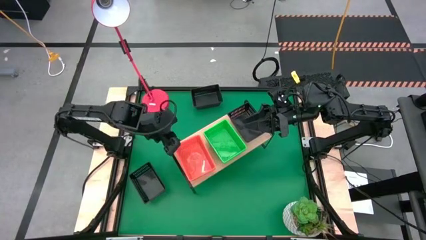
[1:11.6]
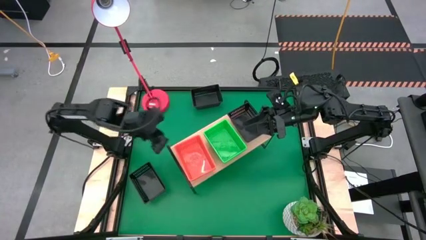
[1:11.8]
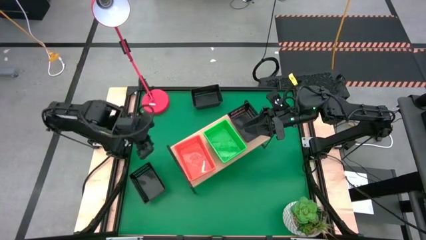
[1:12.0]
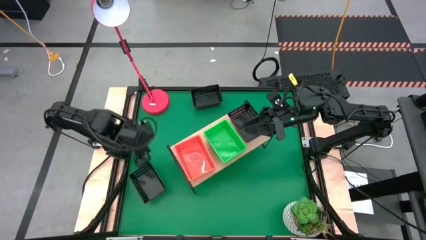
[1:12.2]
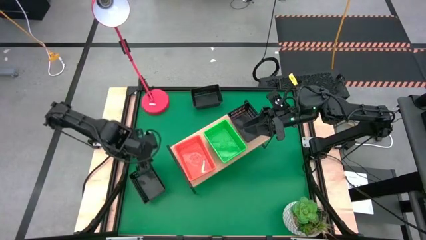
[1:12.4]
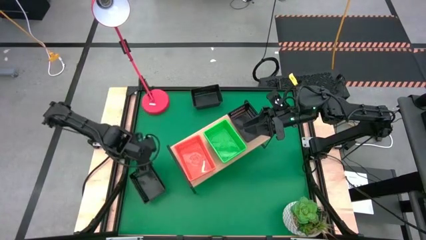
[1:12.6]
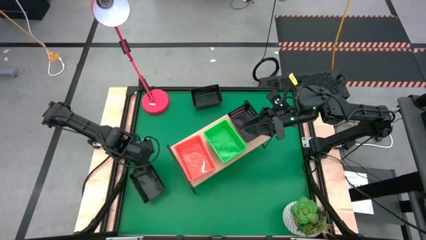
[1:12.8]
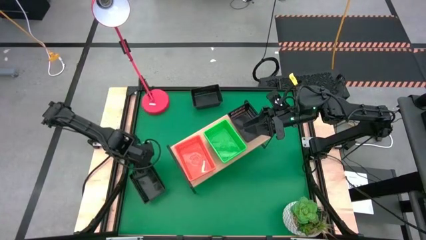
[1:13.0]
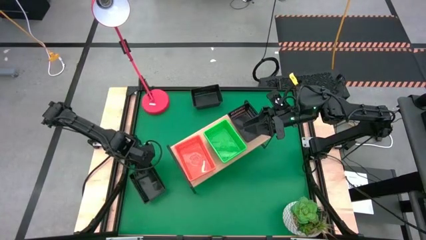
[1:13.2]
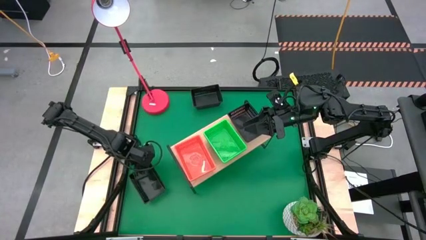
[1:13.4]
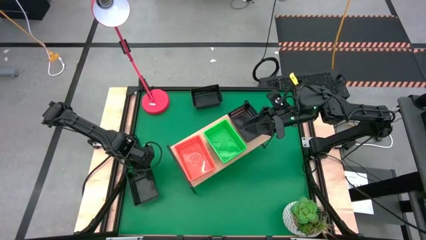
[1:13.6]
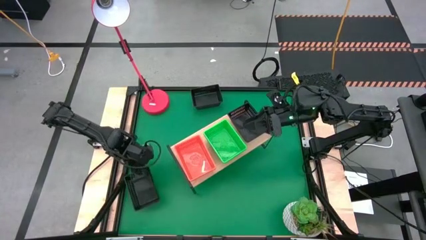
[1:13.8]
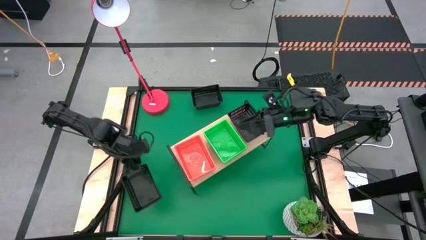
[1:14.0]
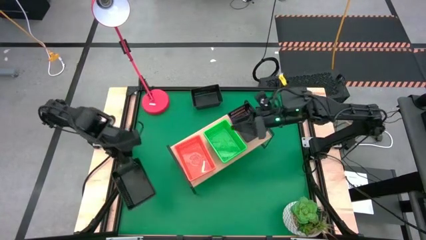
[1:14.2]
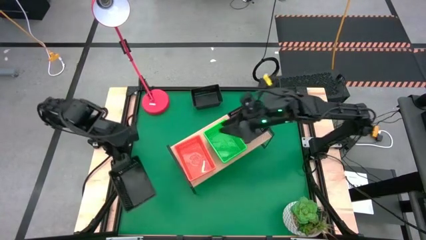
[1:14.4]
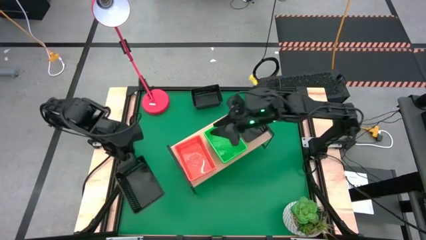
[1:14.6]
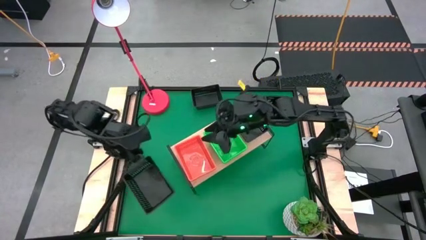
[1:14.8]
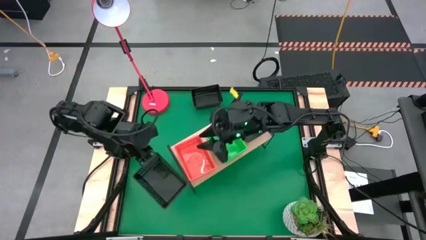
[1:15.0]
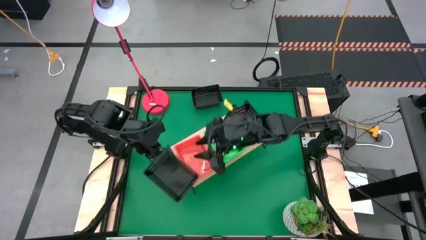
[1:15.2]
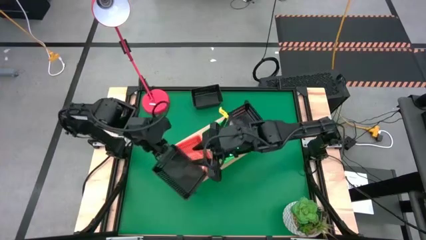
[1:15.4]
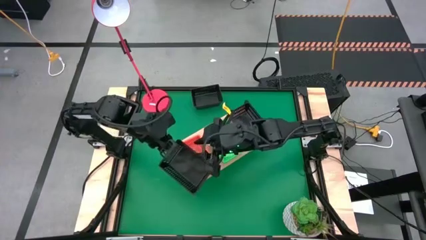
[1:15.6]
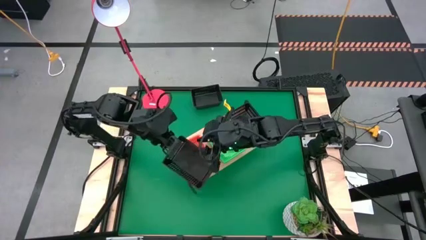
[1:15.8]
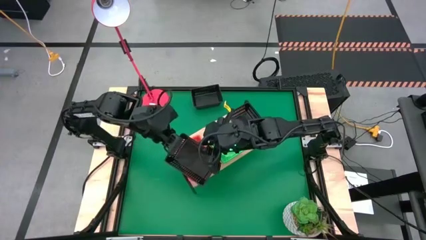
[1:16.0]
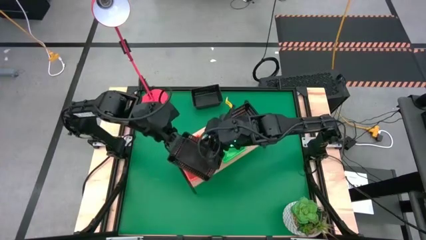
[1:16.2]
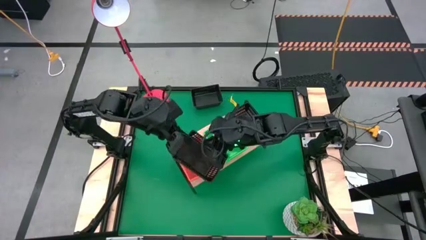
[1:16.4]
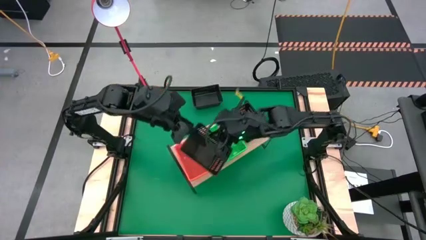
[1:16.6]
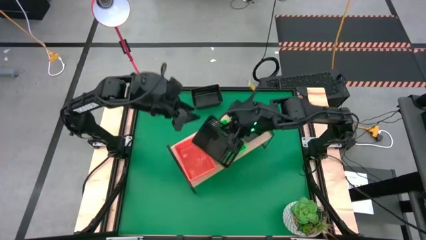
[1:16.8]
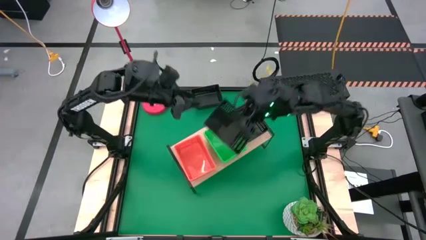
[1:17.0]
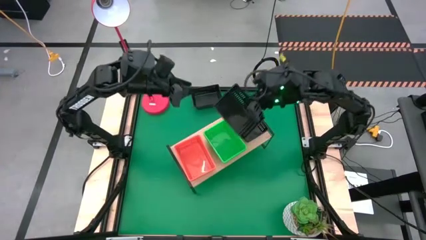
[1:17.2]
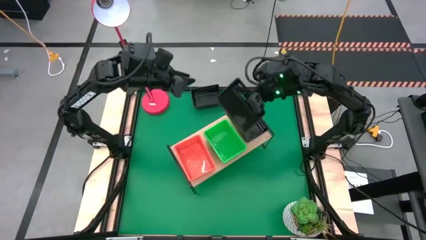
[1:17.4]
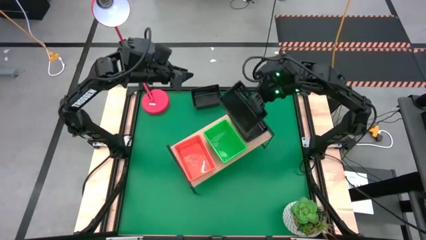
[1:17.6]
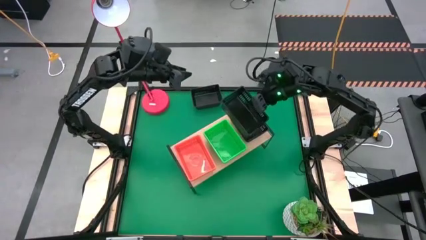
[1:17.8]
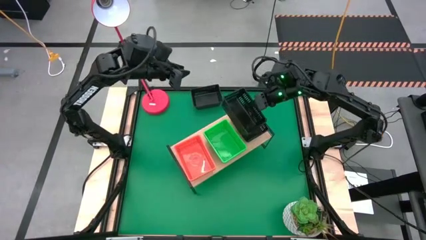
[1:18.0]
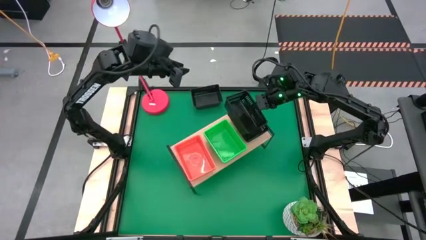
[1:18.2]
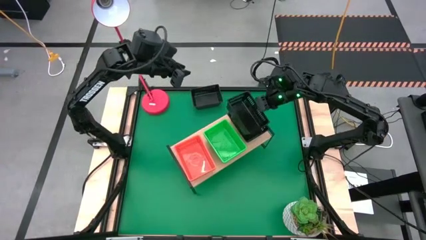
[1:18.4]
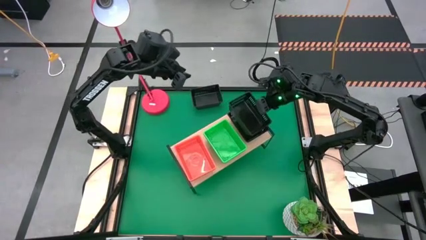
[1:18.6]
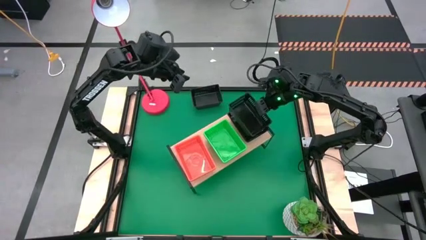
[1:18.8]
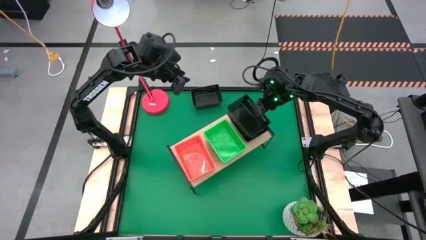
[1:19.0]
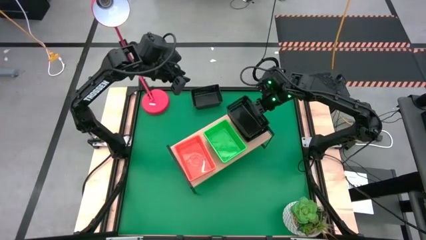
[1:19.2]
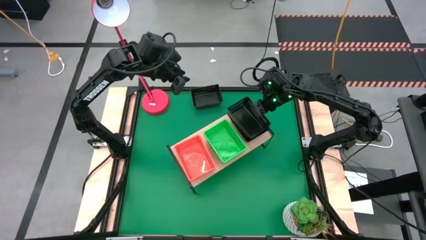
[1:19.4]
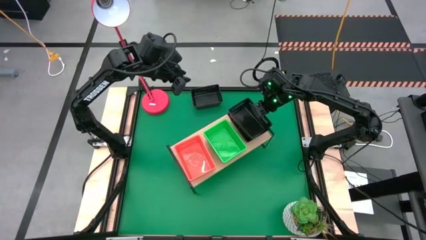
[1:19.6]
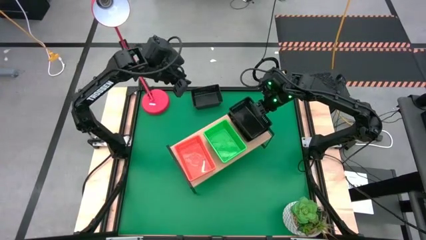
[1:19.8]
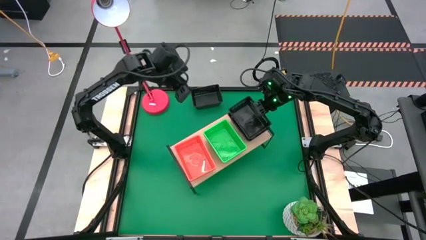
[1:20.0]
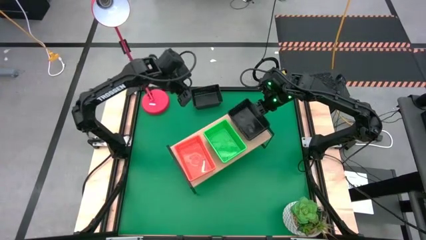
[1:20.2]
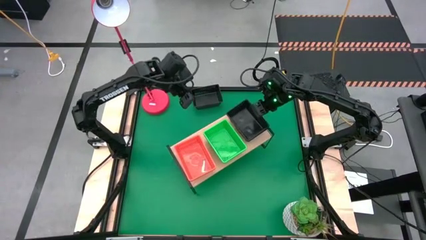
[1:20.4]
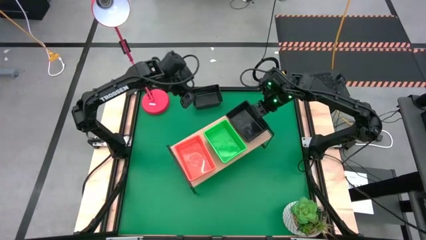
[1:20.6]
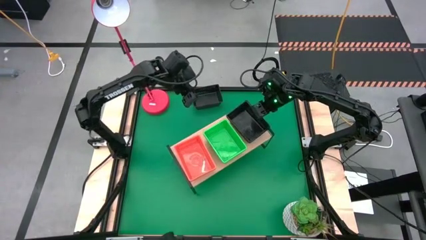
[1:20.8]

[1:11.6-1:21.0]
Task: Stack baskets on shelf by color
Stack the bottom black bin on top of the black bin on the shelf

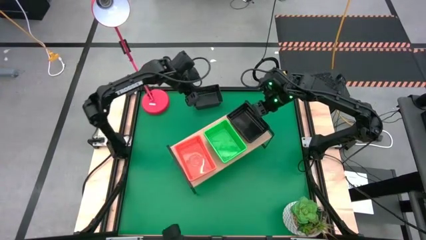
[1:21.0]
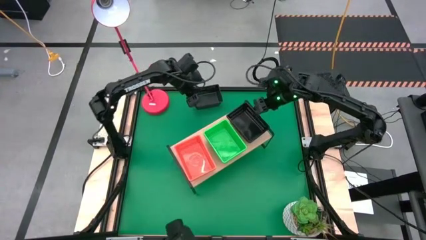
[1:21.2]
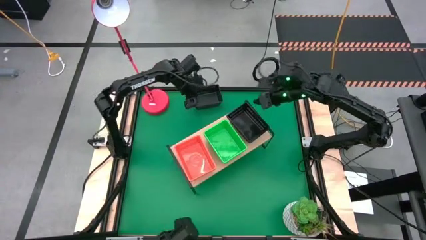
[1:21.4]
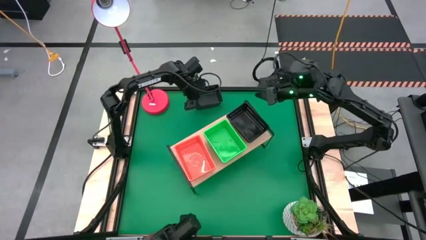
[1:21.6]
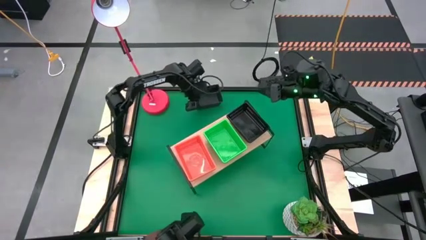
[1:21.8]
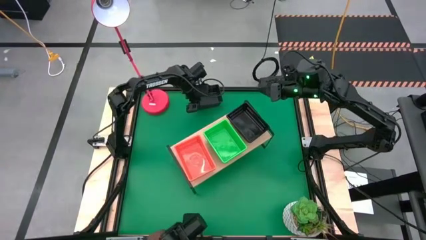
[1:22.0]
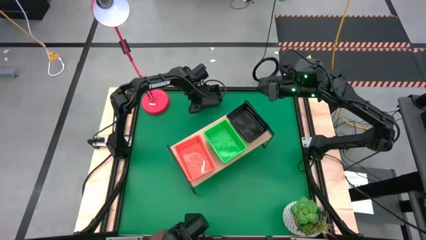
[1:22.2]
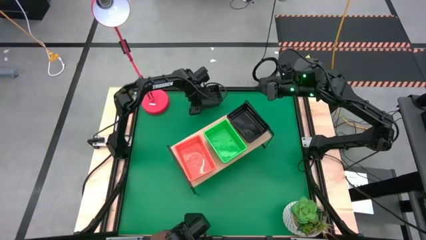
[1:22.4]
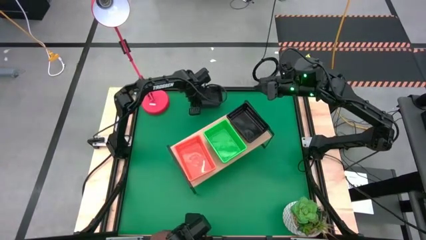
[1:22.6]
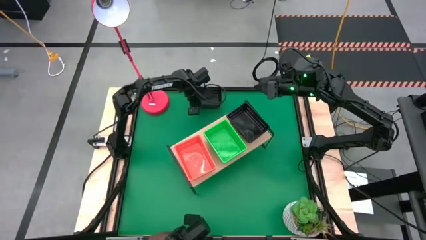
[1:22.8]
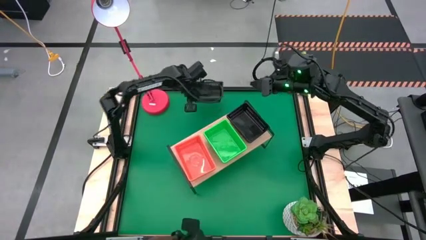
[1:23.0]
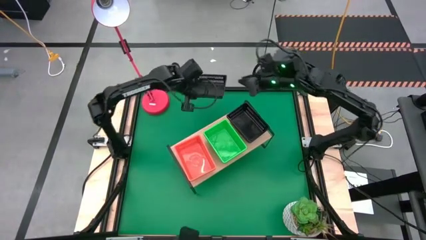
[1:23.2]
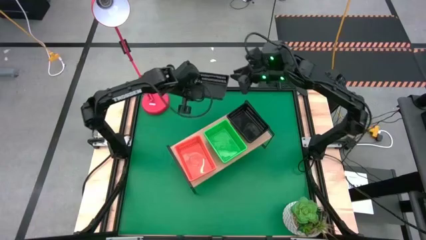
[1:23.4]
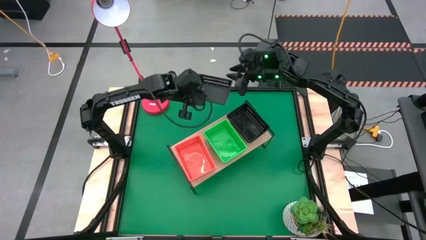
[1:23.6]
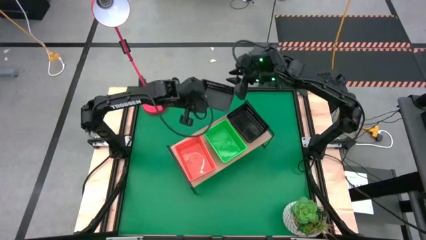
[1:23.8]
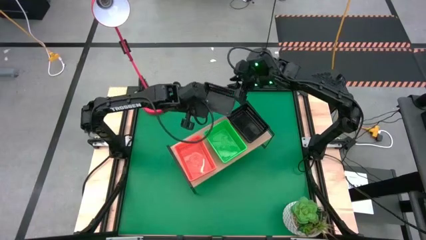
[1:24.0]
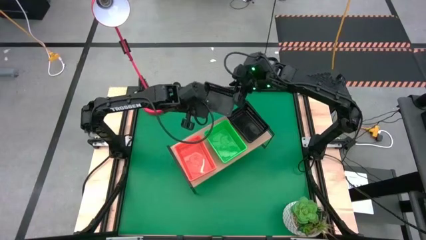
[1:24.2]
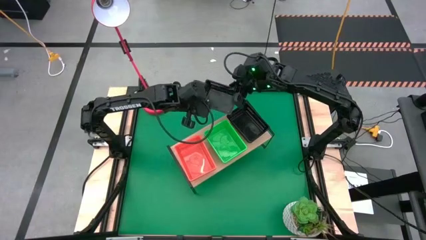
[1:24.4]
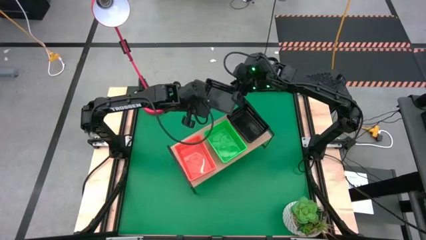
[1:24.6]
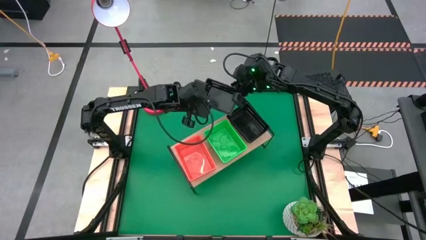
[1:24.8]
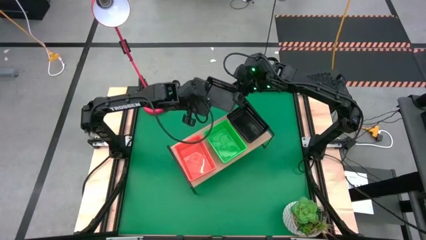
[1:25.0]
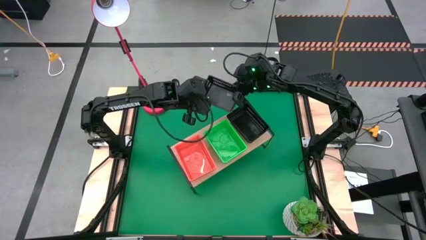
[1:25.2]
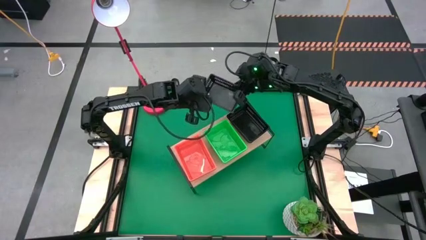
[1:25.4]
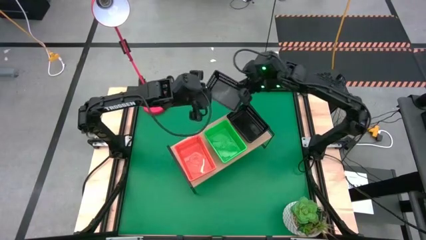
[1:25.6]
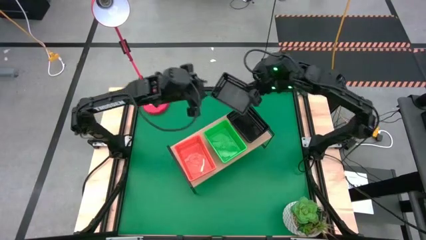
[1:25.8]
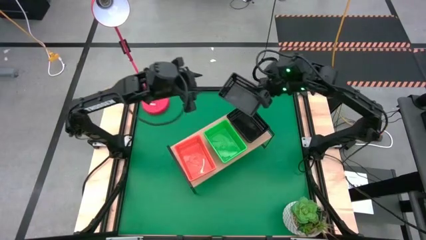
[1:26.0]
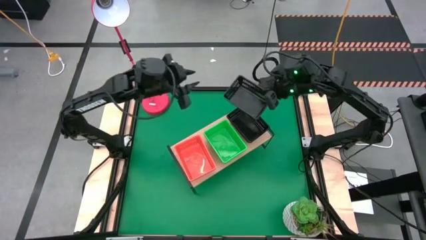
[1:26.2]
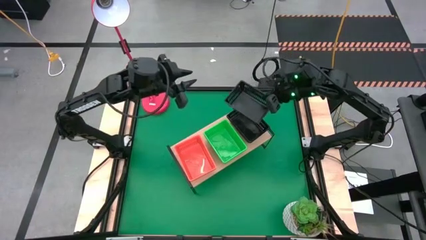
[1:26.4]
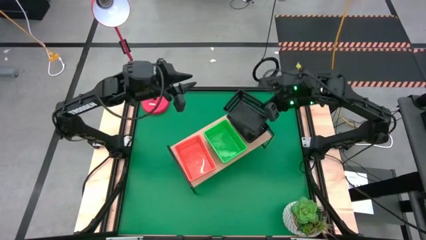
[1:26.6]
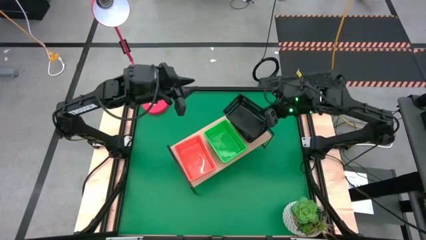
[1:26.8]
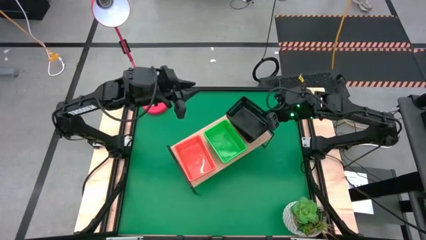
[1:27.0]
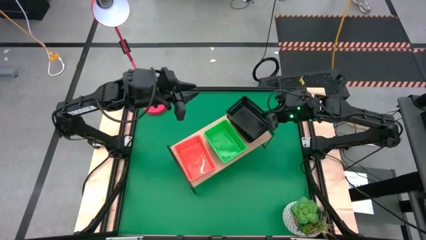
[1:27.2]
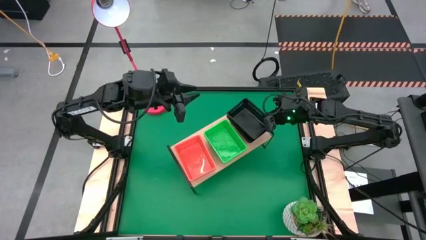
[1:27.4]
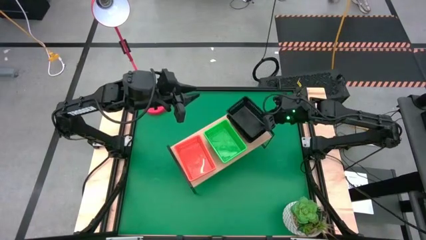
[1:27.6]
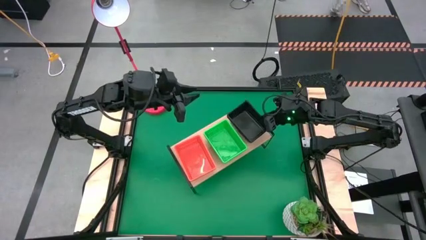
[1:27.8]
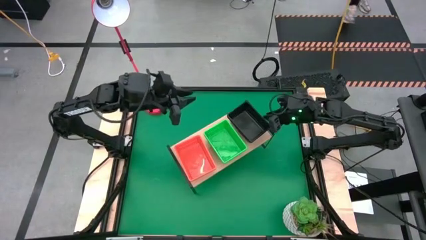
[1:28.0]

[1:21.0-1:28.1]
Stack the black bin on top of the black bins on the shelf

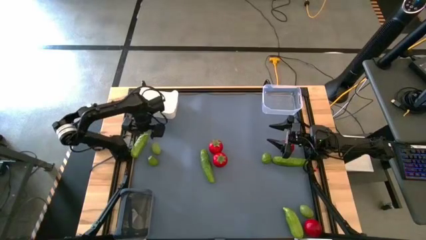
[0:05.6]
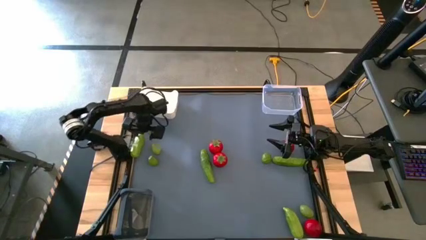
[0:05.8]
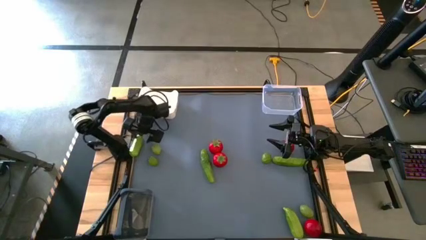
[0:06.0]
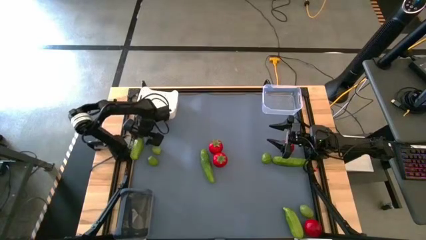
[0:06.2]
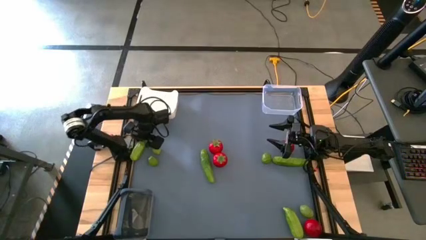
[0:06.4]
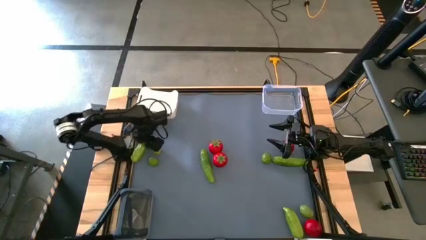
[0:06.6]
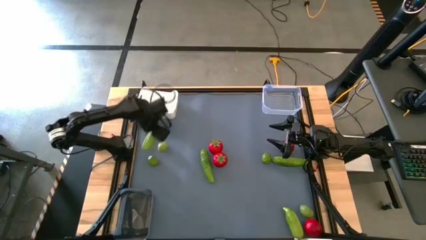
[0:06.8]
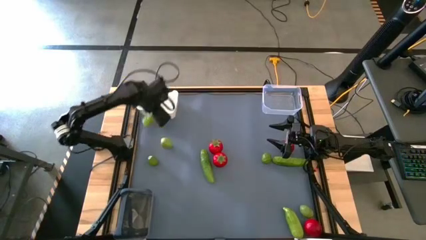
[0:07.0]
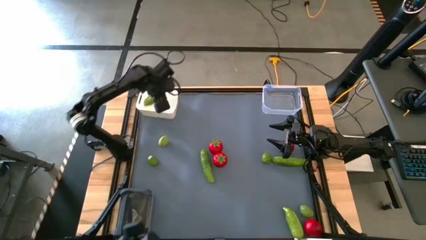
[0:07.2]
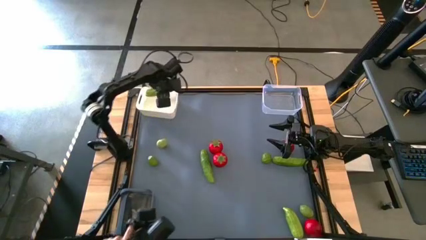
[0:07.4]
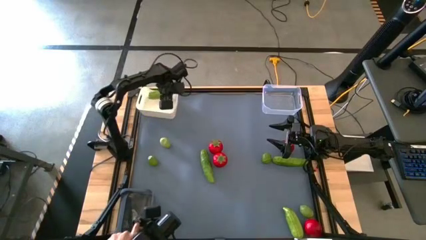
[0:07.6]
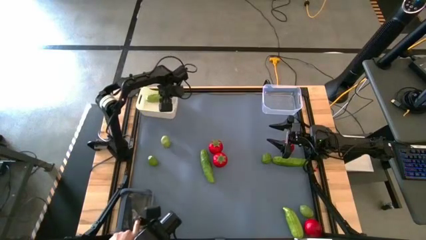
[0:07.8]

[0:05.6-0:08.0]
Task: Sort produce into baskets
Put the top left cucumber into the white bin
